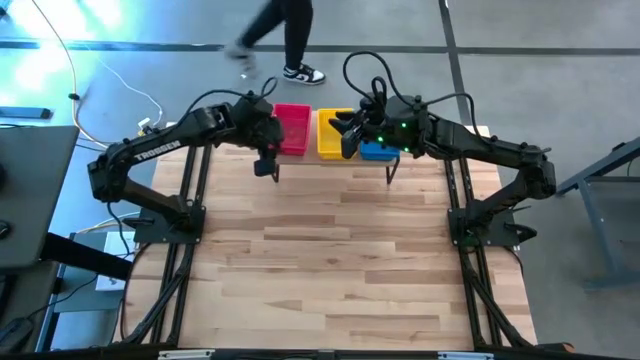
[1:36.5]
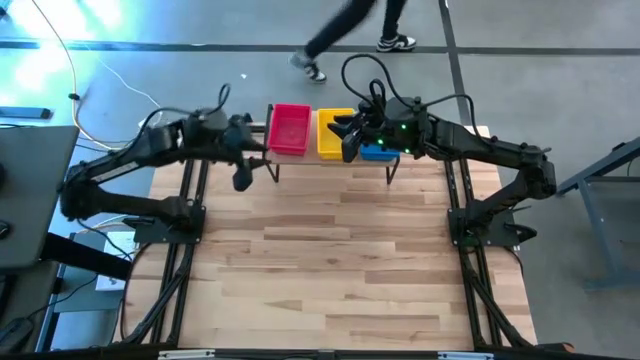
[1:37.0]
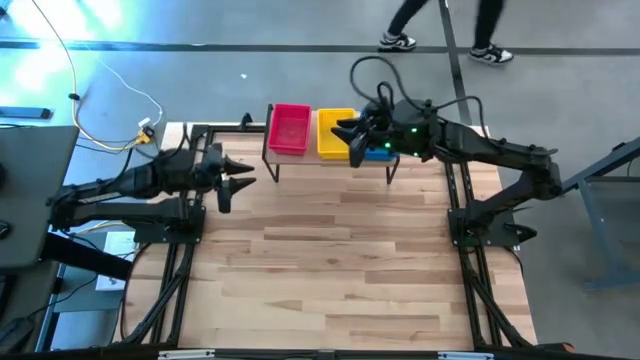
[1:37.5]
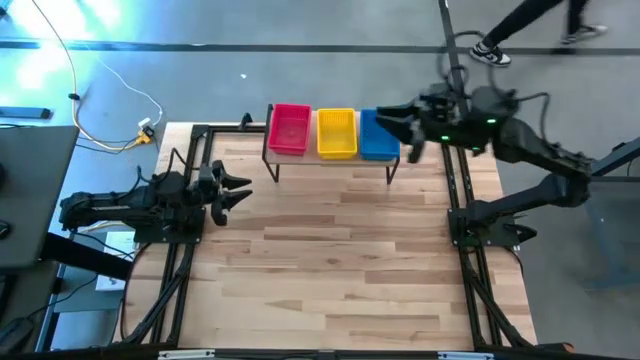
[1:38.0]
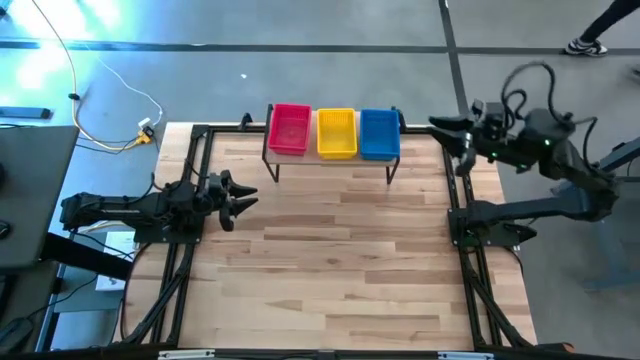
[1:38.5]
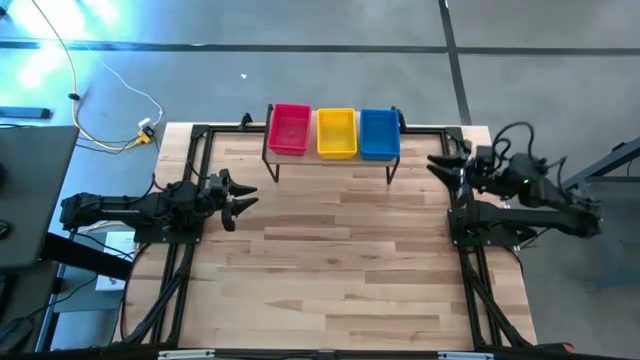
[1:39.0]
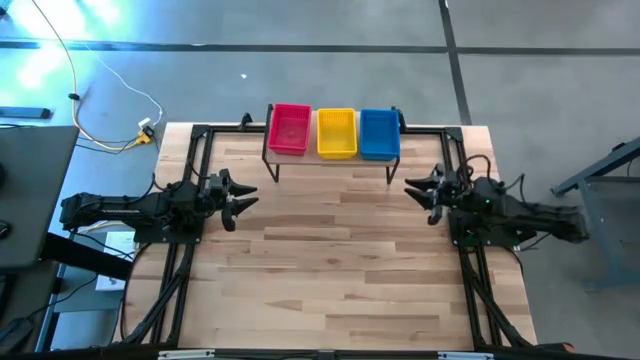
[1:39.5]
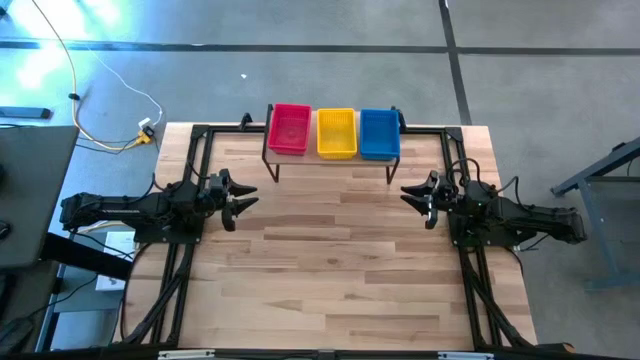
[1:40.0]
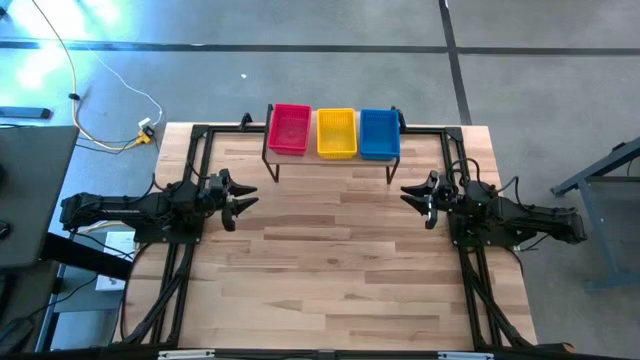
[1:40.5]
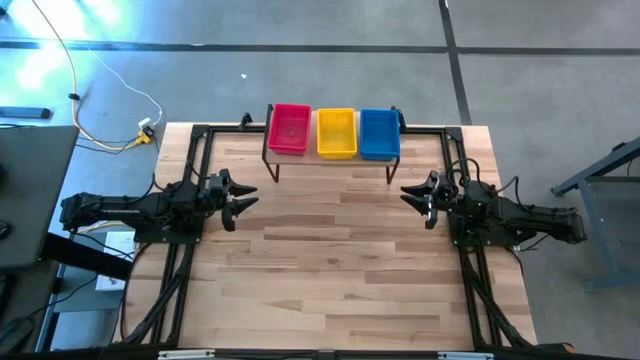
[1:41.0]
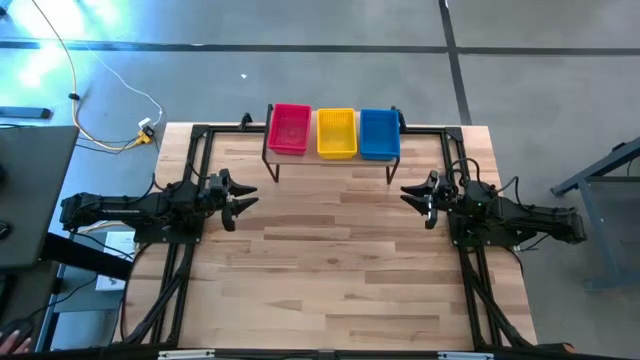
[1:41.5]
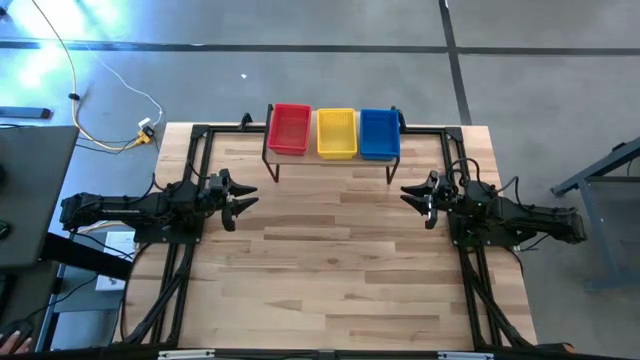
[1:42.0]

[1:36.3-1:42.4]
Task: Stack baskets on shelf by color
Return to Home Position

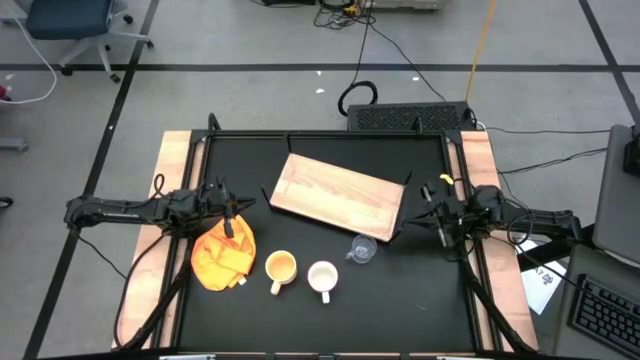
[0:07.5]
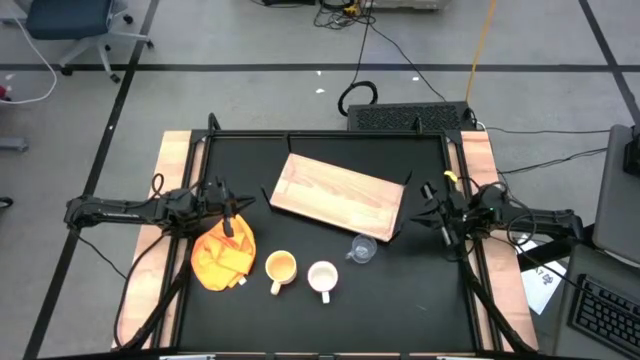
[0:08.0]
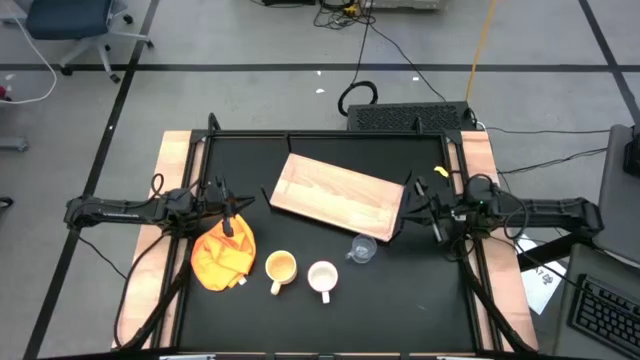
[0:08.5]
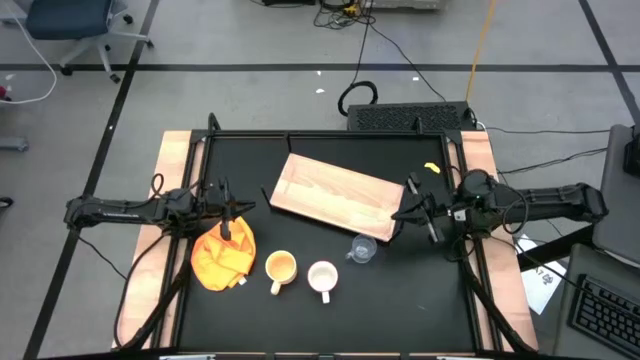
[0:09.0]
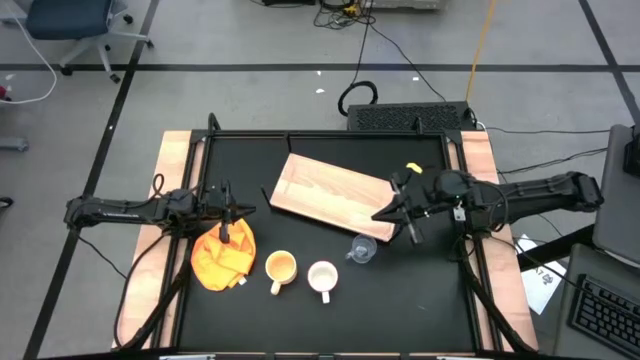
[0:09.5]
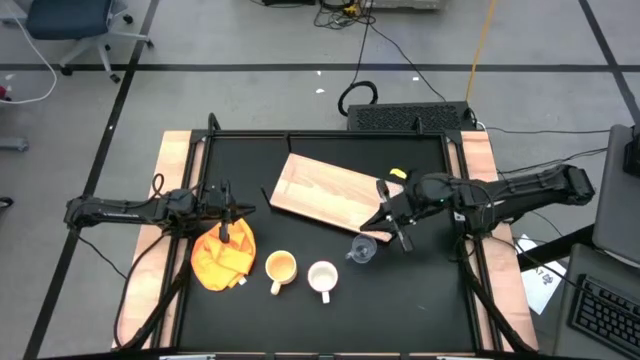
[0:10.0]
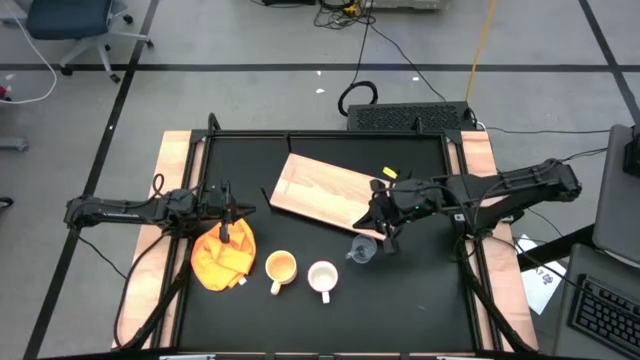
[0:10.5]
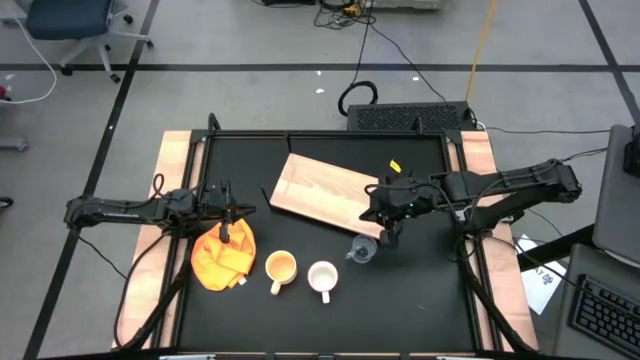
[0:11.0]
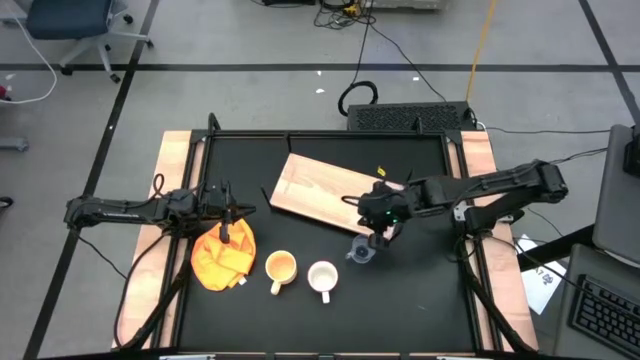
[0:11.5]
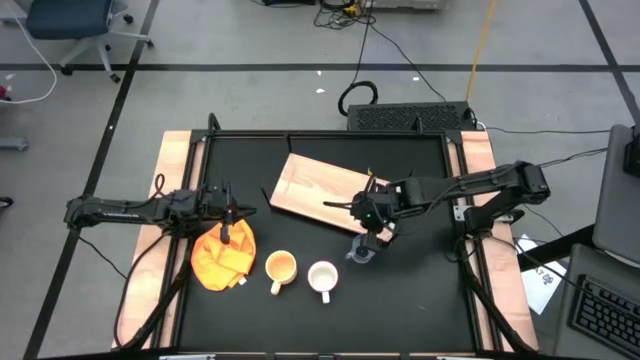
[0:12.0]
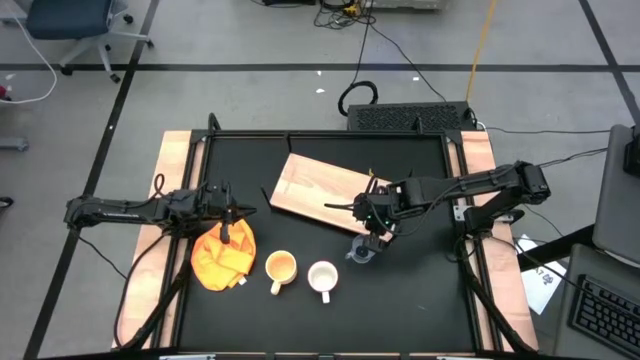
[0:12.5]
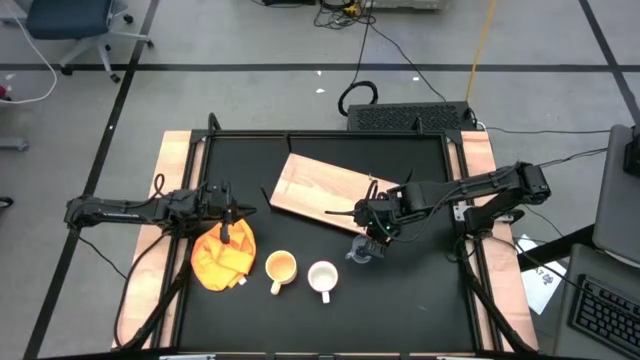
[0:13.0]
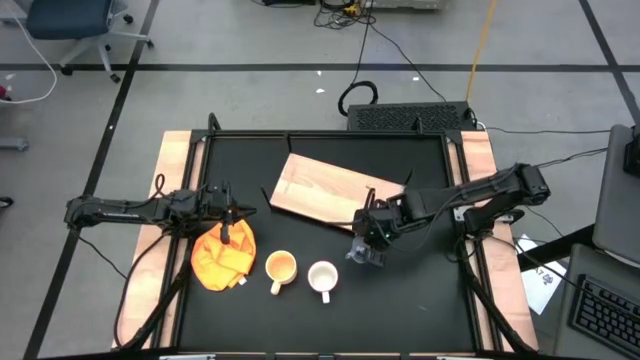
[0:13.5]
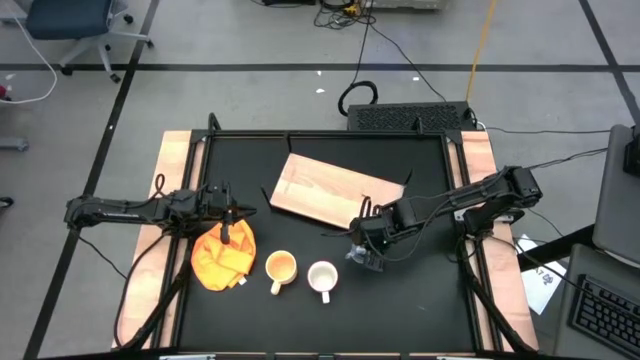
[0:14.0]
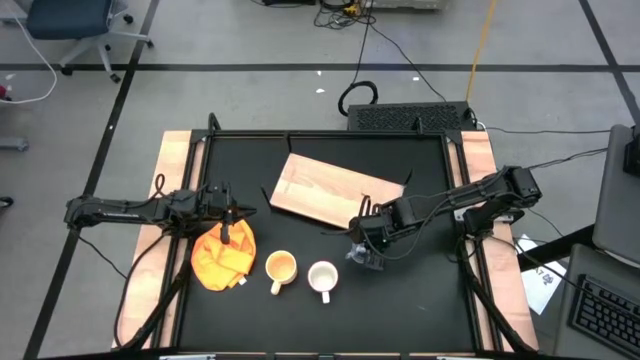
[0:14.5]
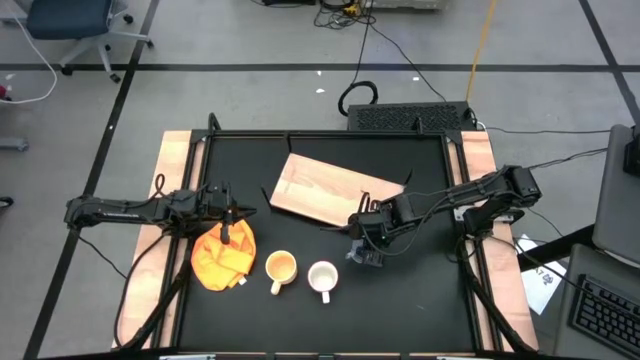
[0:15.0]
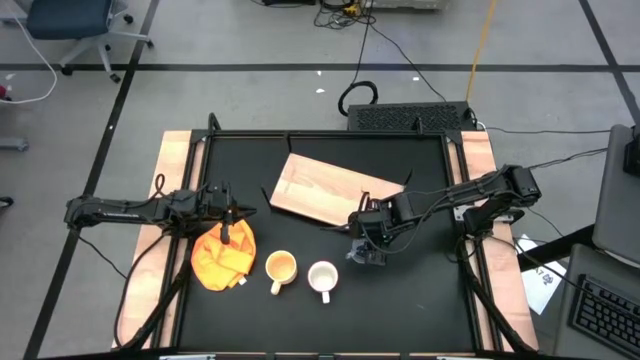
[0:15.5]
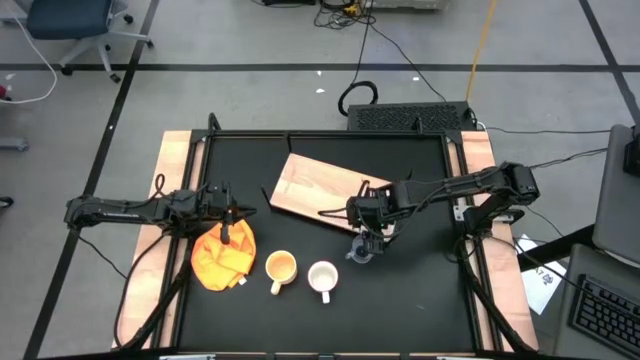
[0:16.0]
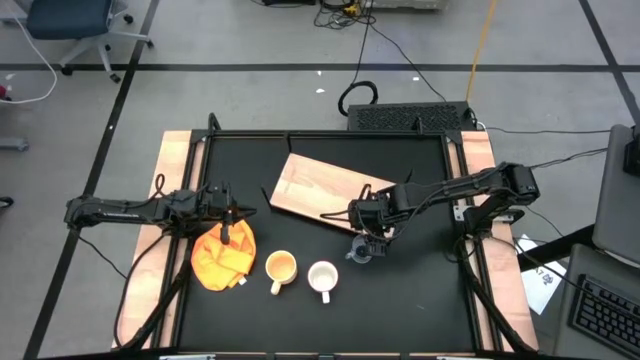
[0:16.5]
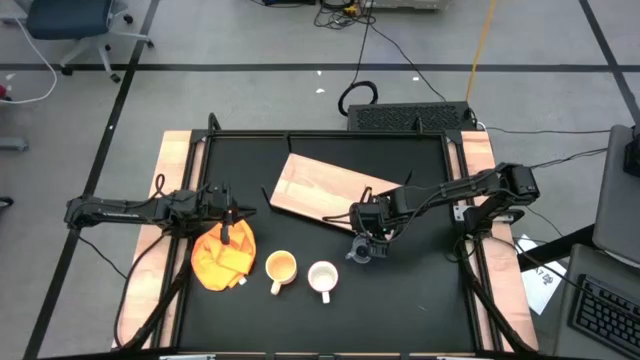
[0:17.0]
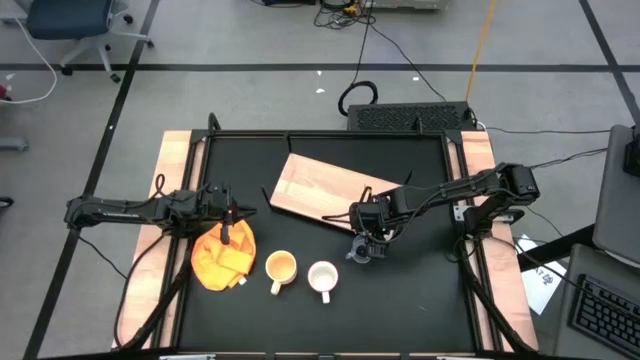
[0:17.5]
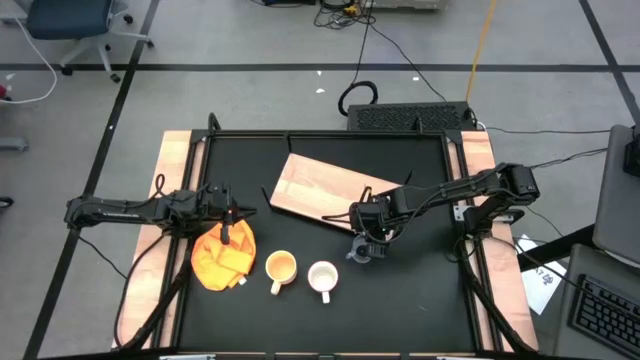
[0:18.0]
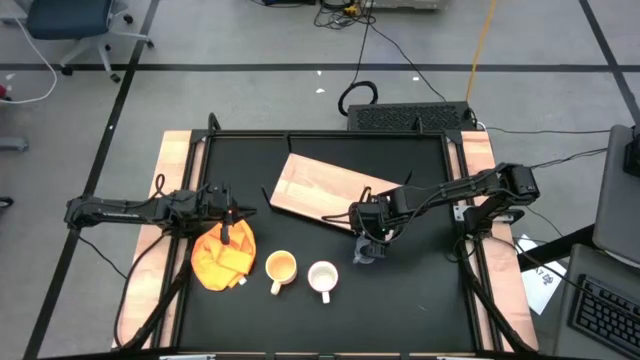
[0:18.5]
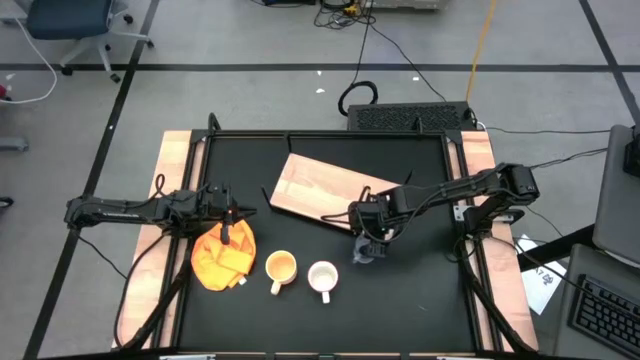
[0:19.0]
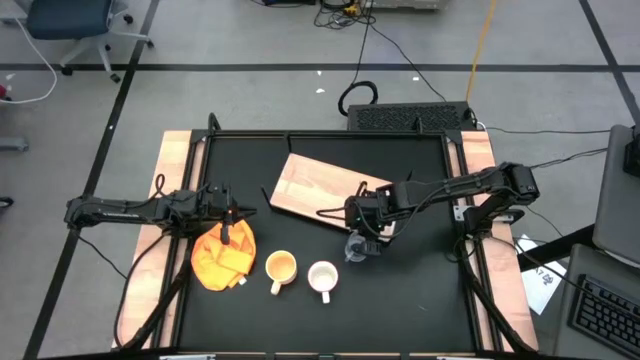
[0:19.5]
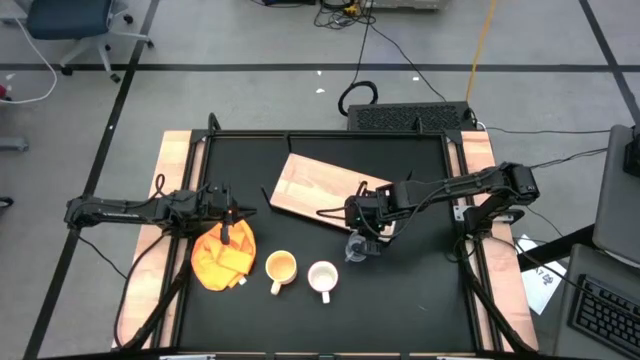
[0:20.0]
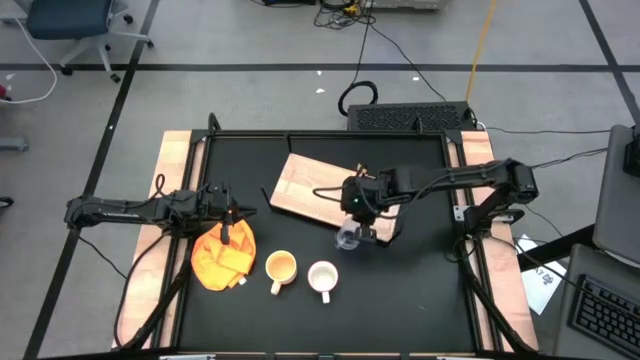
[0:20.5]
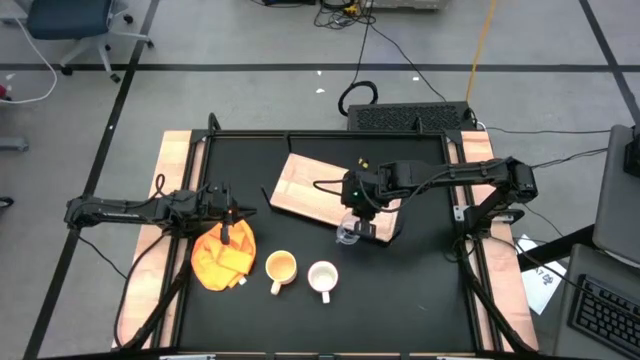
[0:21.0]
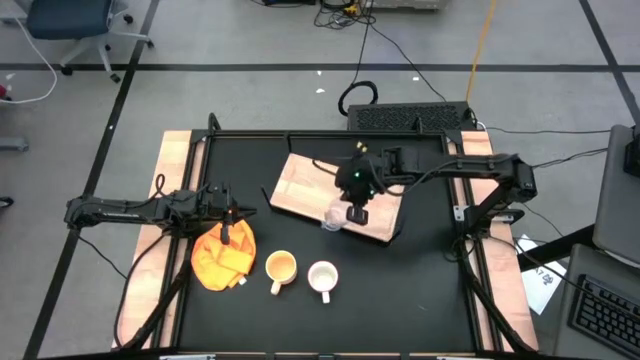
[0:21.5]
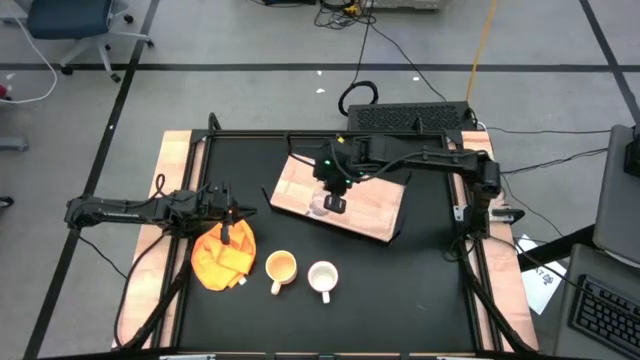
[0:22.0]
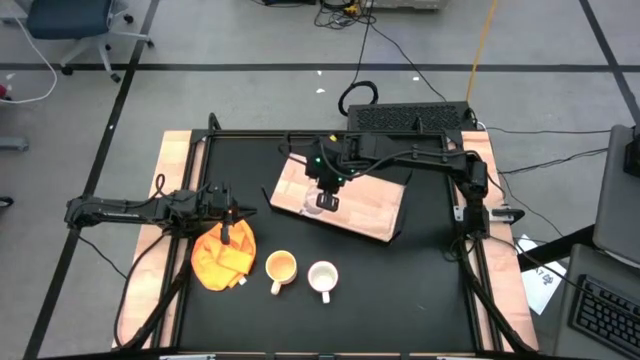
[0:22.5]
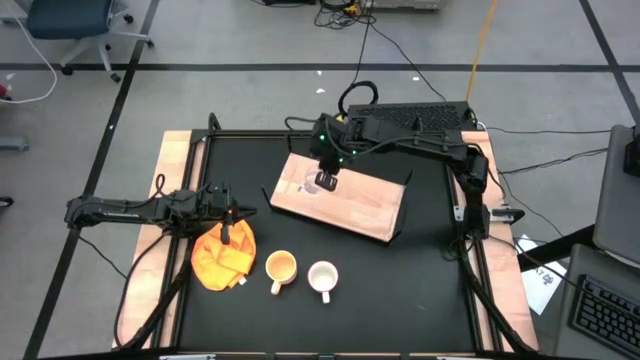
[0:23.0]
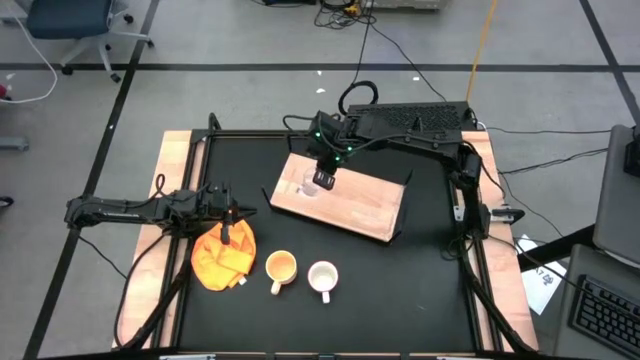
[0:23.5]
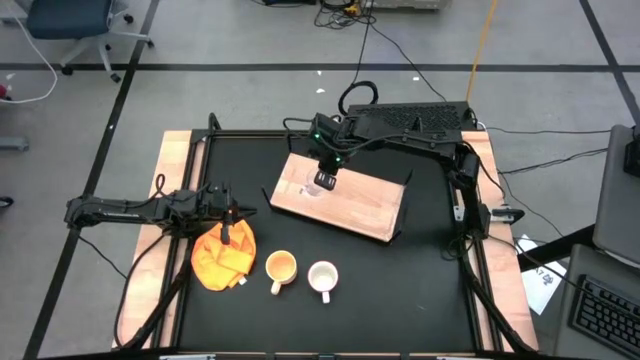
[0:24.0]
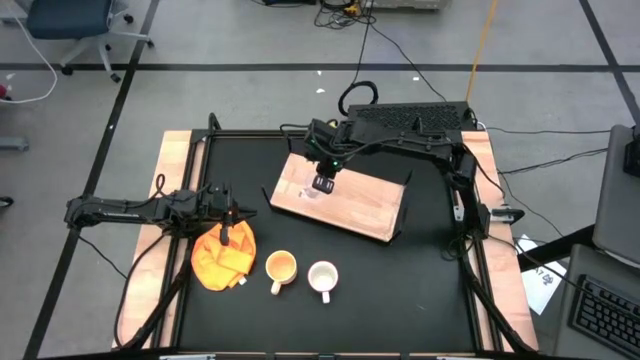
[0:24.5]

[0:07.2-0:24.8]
Task: Stack small to large cups/mugs on shelf
Put the transparent mug on the shelf
